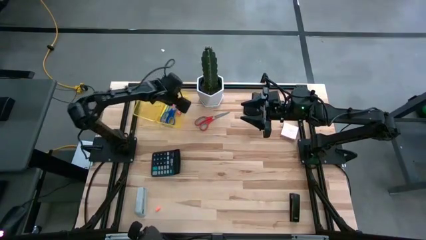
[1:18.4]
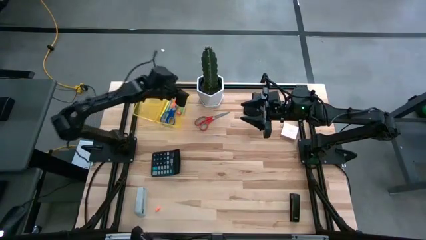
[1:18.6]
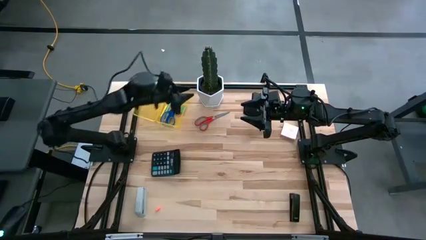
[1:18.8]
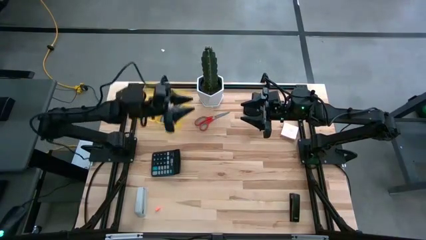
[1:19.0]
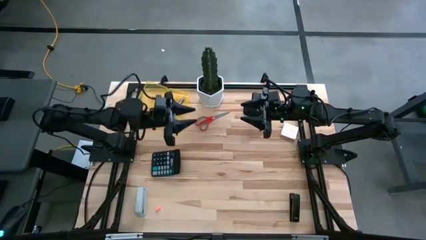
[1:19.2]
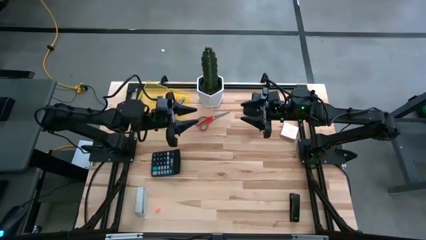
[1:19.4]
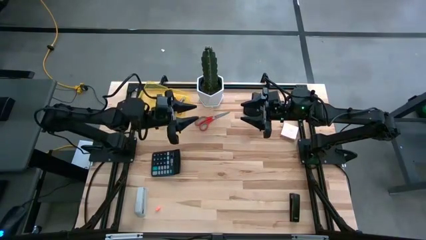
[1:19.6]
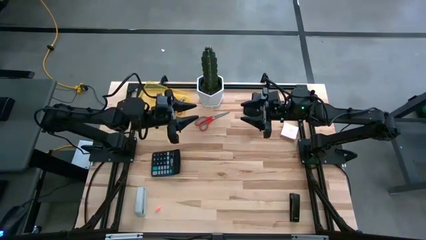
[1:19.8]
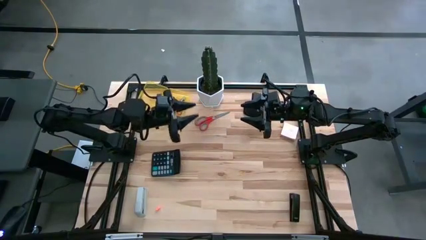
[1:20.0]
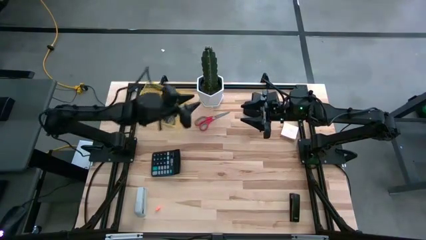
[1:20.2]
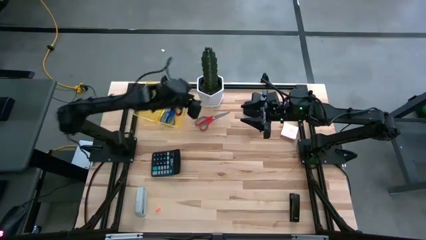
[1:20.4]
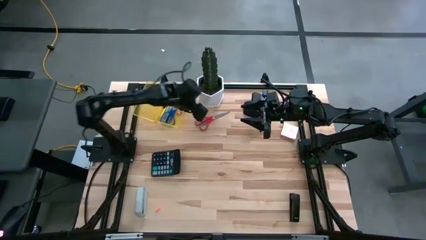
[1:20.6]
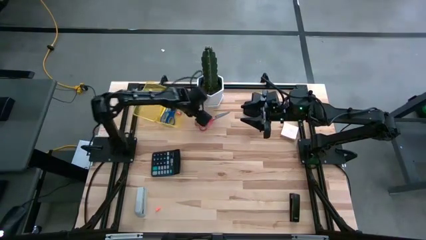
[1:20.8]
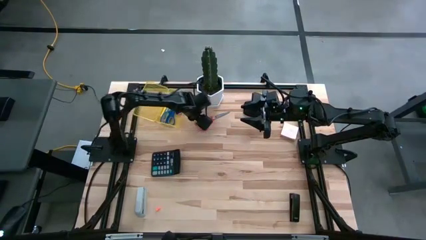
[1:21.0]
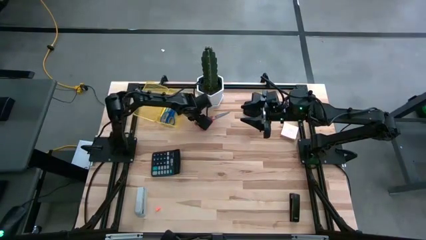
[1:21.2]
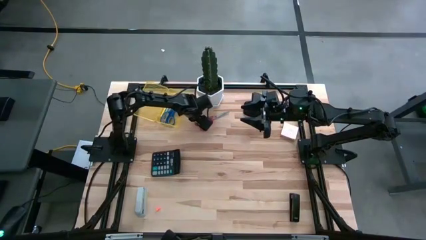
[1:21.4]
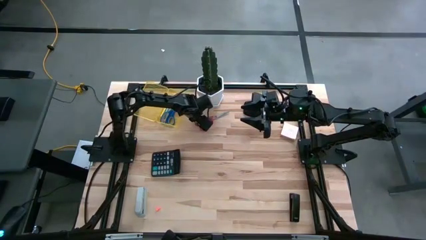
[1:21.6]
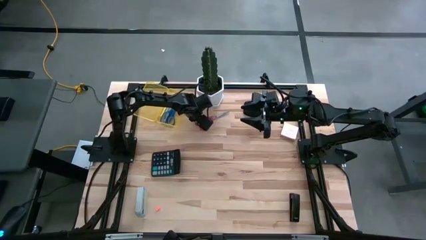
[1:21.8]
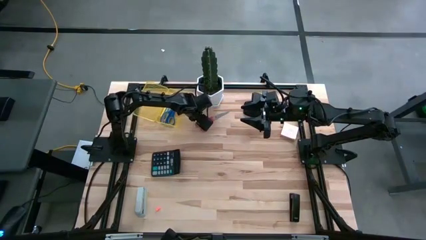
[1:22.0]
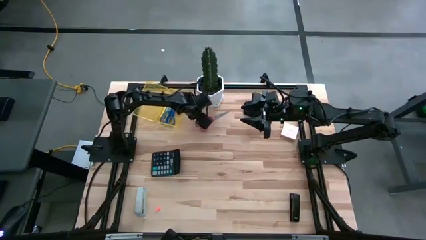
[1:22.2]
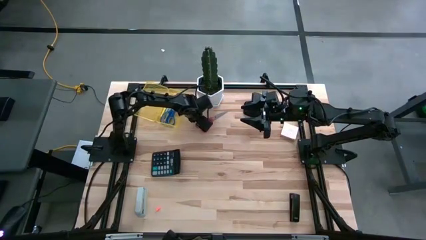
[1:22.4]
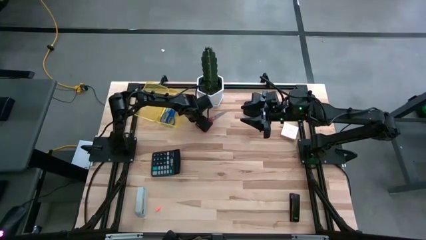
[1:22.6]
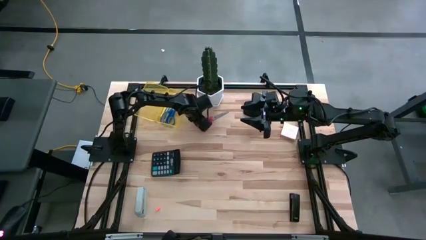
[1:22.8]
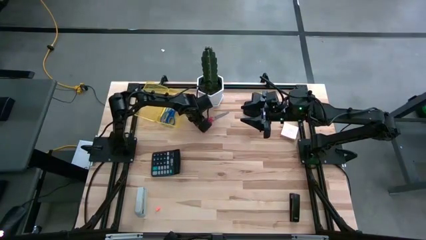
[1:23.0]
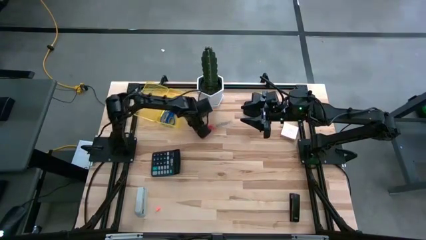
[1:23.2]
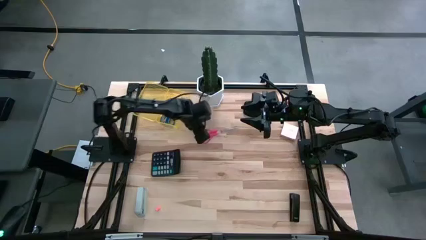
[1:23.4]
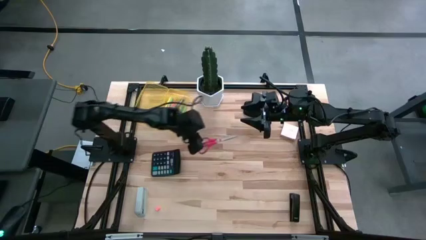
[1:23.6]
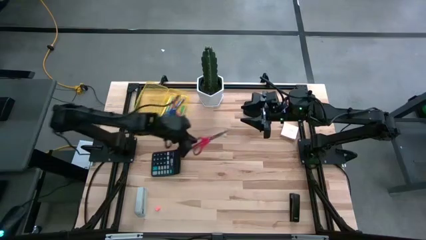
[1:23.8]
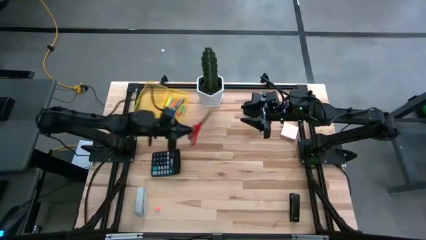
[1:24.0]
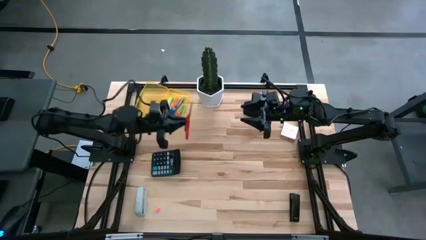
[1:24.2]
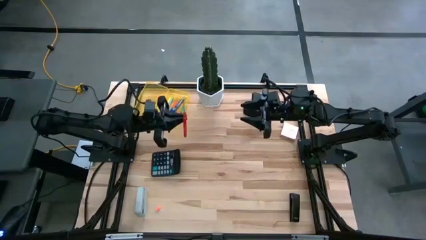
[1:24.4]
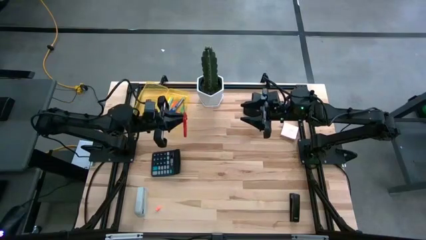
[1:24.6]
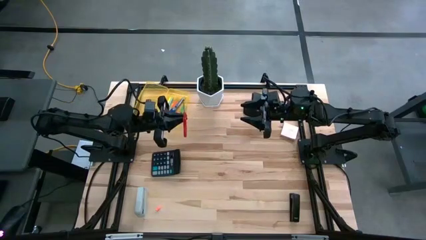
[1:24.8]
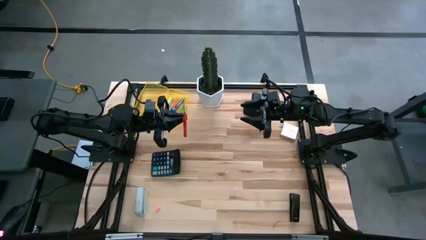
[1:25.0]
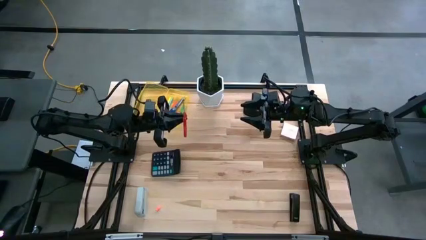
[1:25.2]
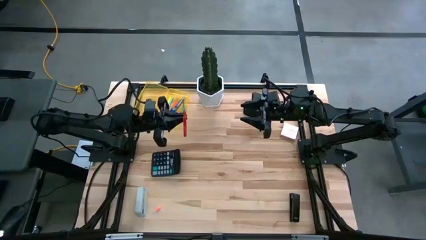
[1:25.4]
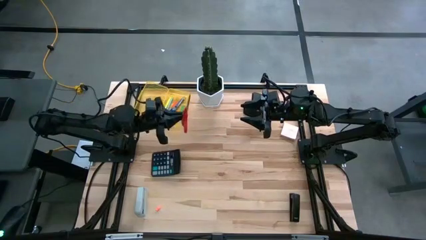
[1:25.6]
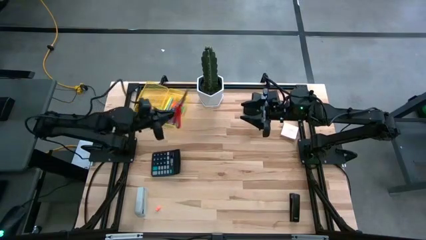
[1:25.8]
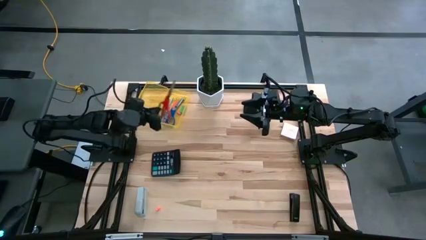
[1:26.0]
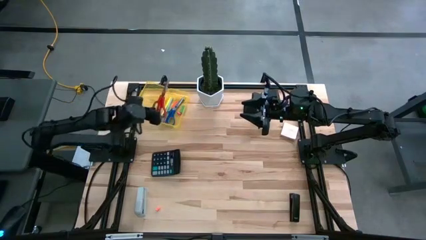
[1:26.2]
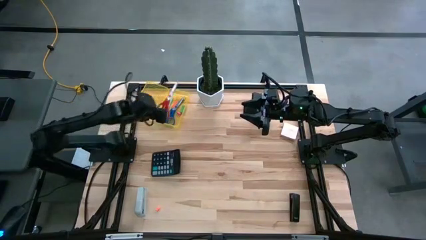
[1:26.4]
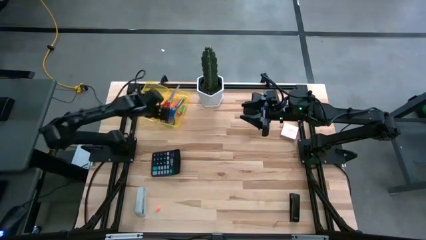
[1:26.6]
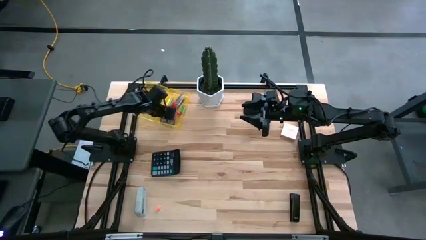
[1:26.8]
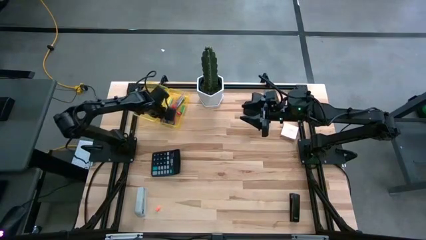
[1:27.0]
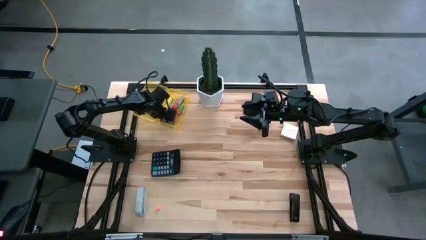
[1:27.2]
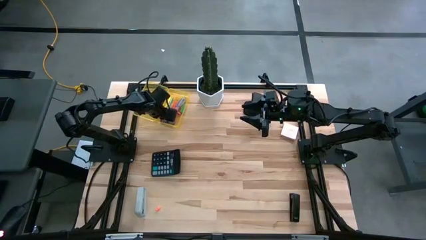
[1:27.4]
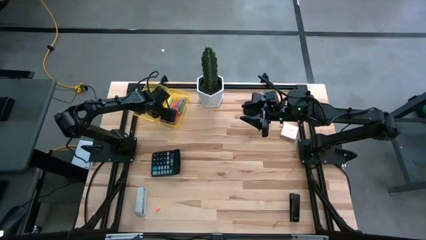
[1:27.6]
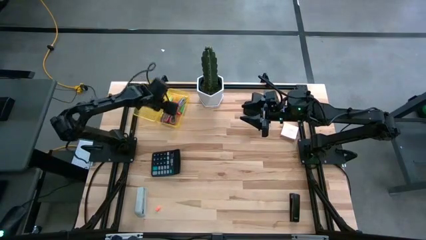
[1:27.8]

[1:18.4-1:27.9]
Task: Pack school essentials
Put the red scissors into the transparent yellow supply box

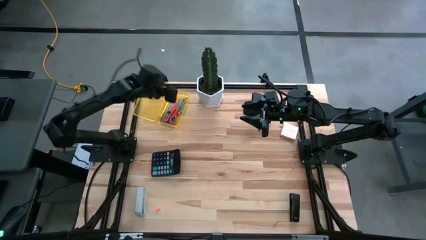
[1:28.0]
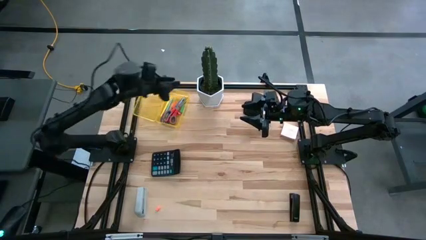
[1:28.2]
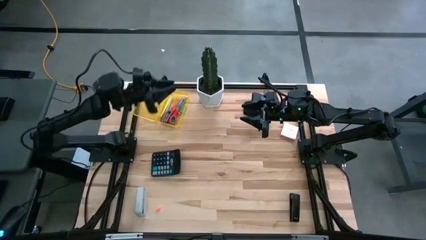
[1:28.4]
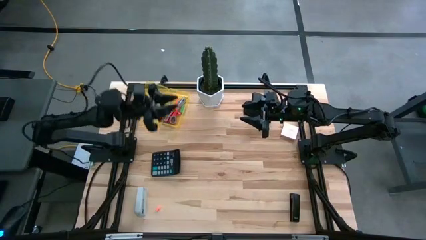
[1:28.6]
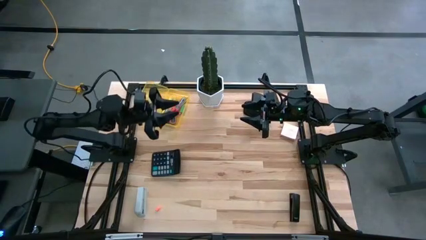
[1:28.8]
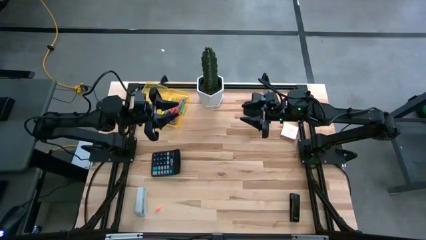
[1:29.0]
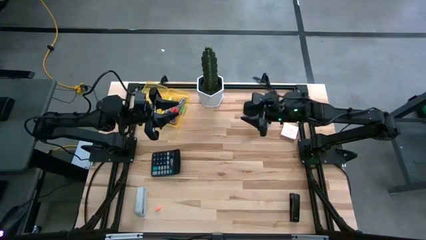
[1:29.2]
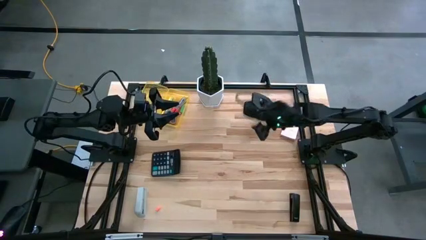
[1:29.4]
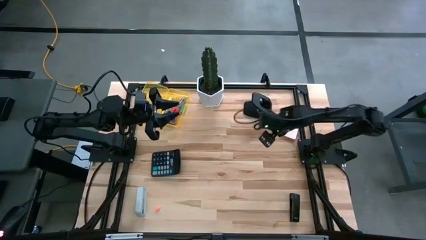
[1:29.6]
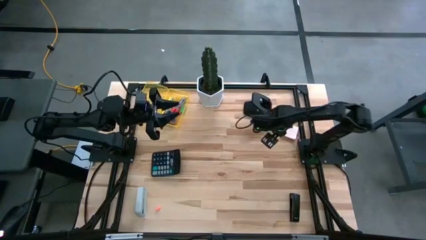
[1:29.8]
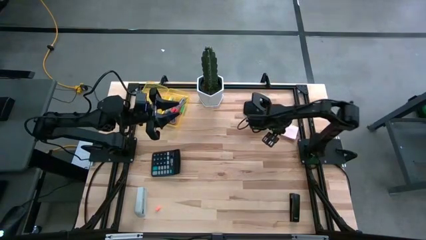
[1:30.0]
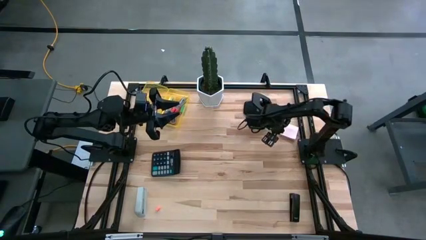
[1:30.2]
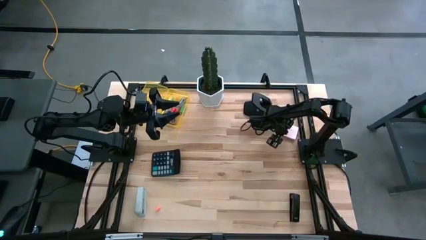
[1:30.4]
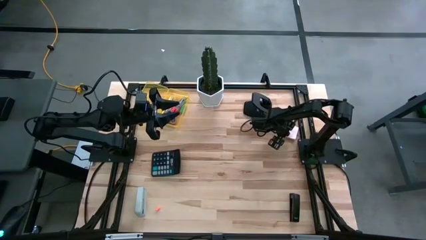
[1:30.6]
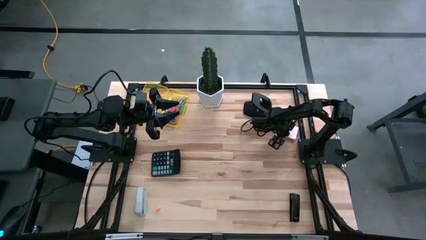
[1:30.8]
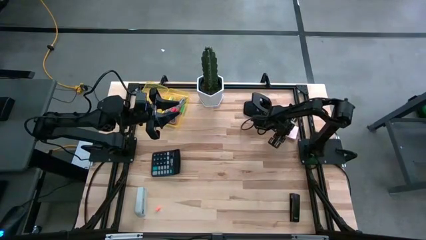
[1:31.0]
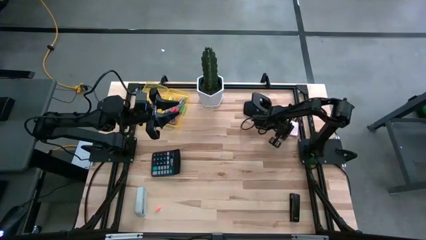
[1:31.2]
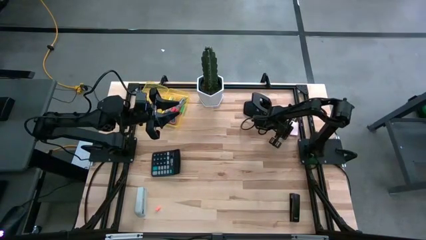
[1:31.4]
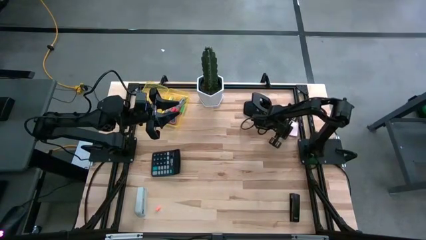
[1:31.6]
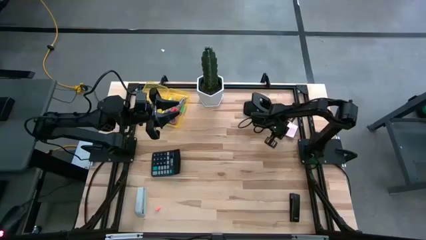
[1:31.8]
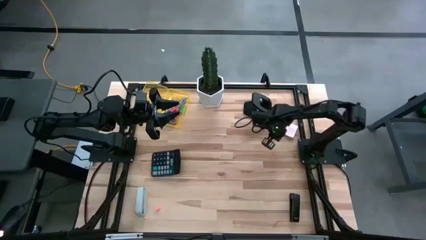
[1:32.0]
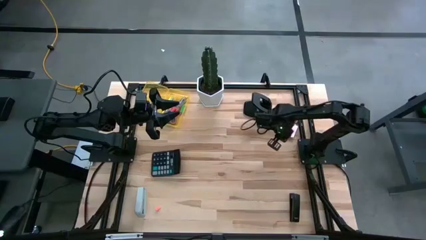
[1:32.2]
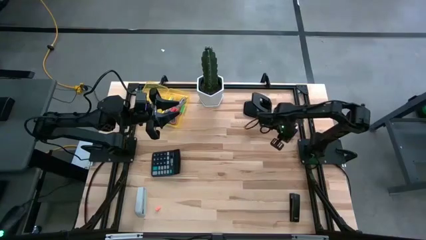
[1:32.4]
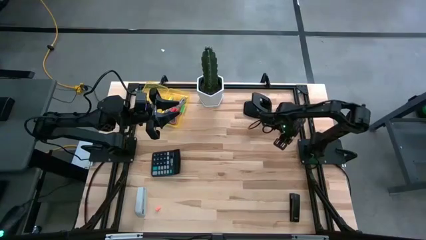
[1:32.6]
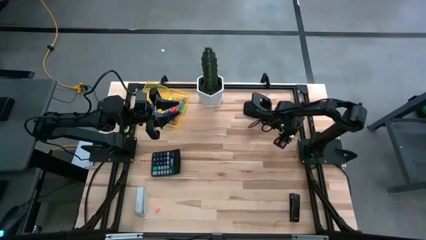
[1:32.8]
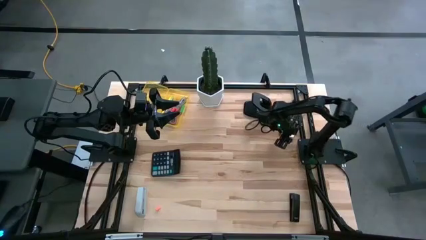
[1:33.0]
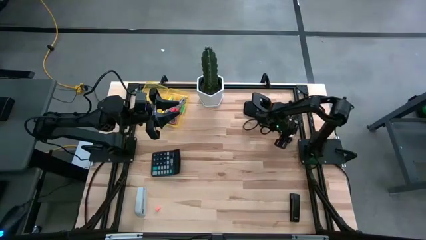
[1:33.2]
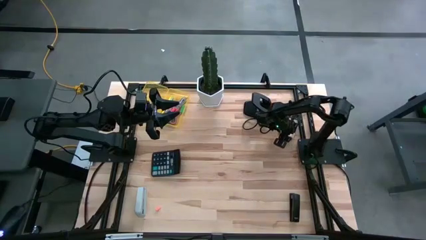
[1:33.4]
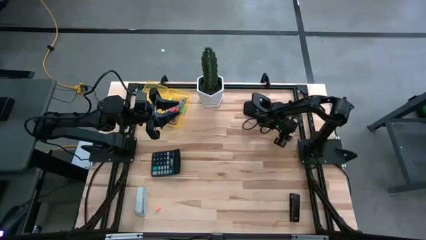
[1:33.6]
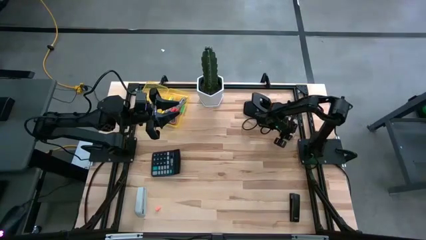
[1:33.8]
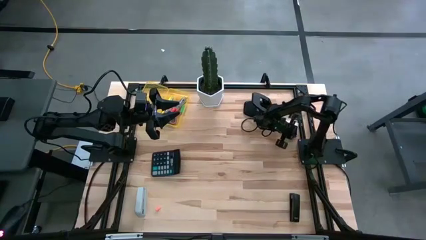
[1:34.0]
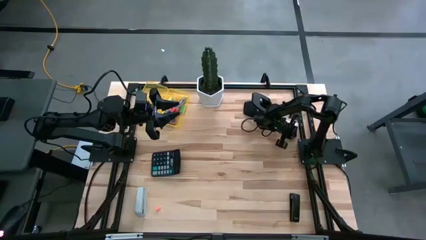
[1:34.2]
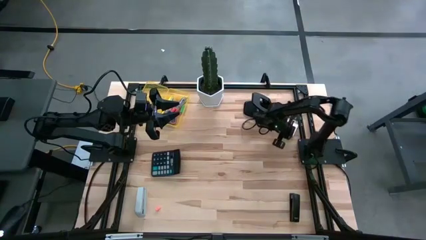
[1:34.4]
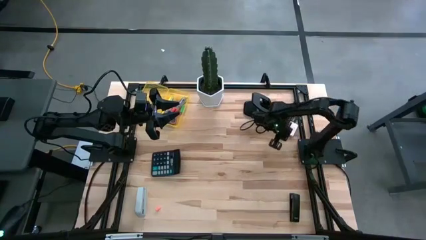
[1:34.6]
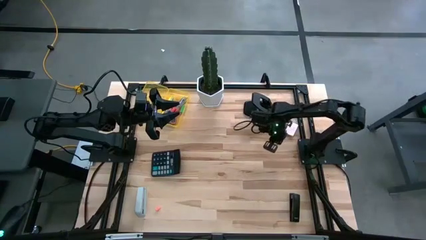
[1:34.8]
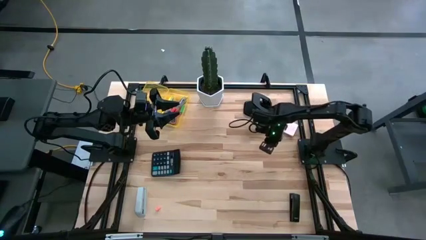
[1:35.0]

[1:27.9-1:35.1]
Put the sticky notes into the transparent yellow supply box
